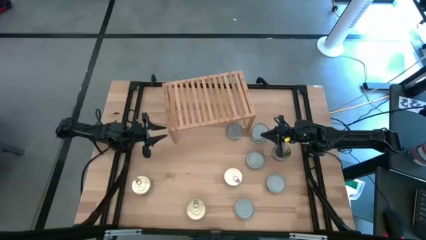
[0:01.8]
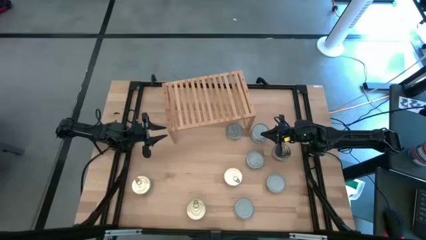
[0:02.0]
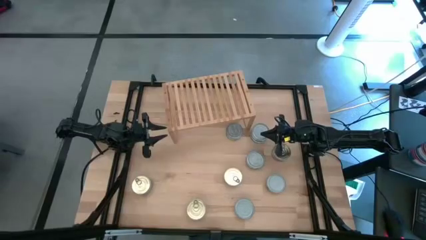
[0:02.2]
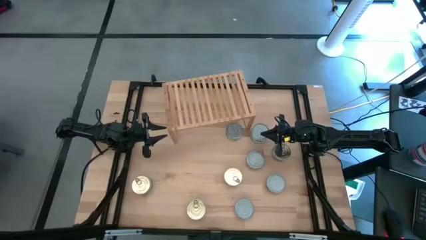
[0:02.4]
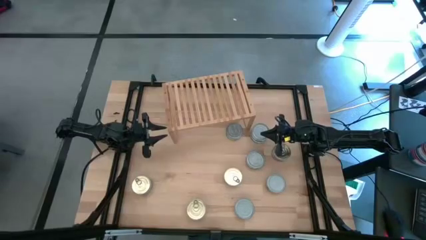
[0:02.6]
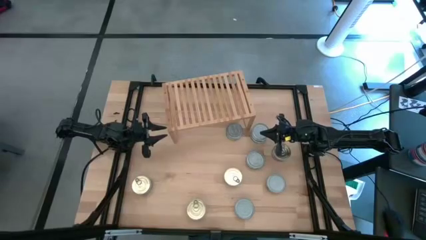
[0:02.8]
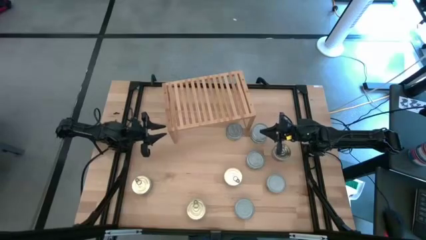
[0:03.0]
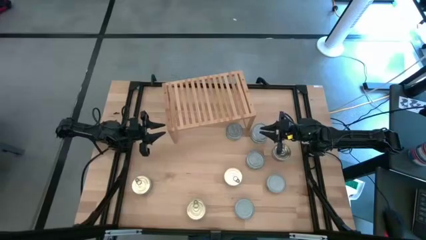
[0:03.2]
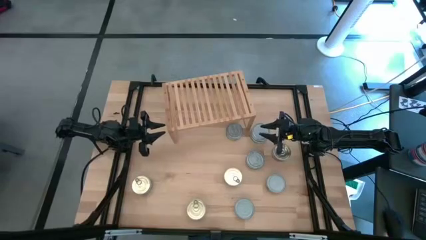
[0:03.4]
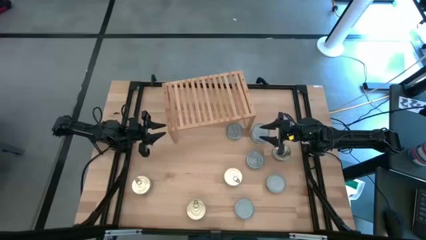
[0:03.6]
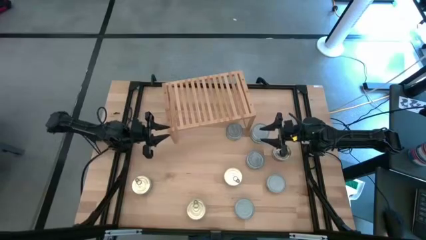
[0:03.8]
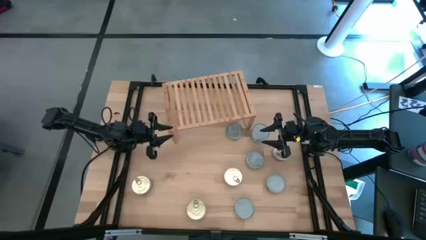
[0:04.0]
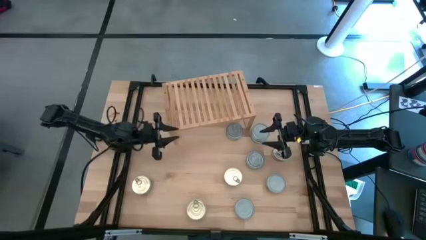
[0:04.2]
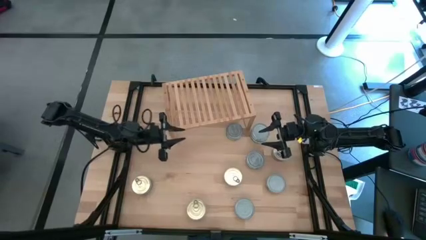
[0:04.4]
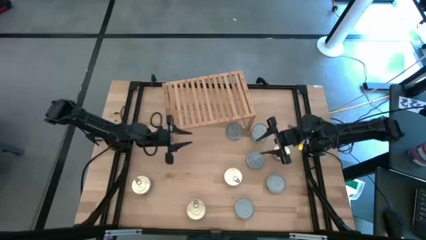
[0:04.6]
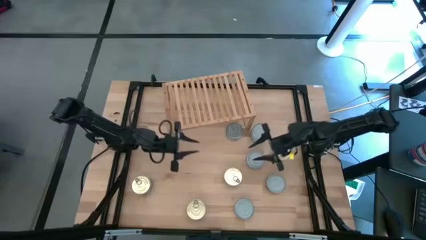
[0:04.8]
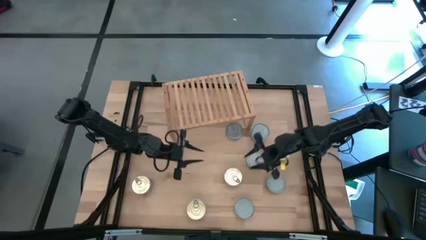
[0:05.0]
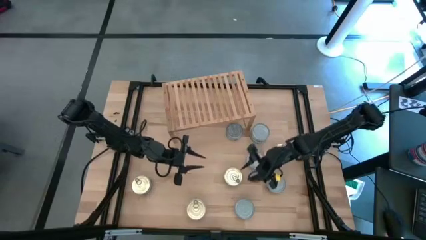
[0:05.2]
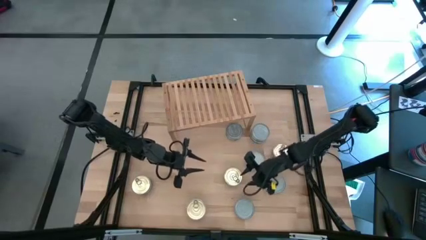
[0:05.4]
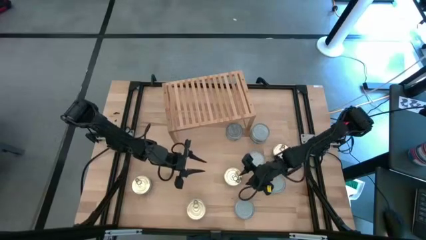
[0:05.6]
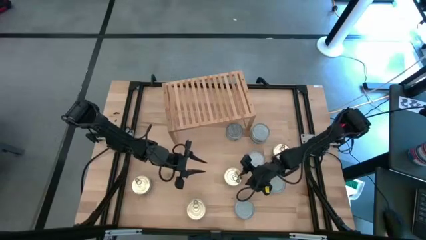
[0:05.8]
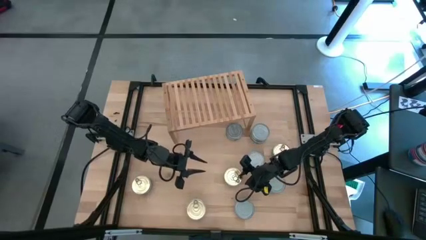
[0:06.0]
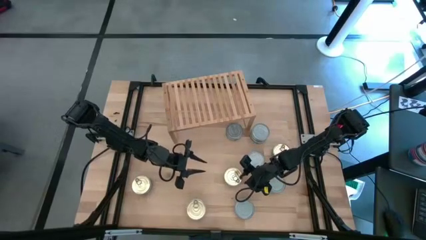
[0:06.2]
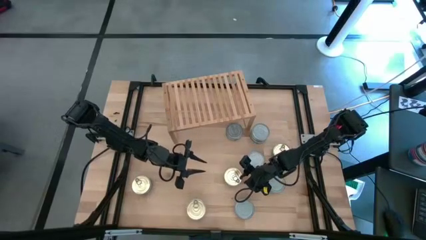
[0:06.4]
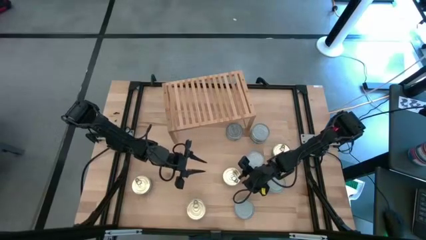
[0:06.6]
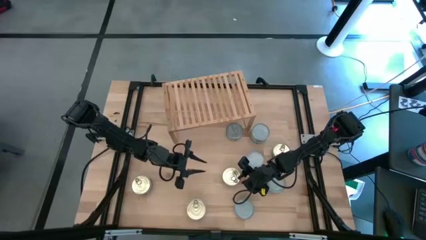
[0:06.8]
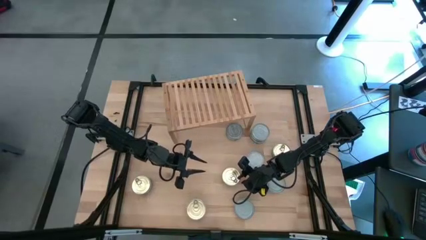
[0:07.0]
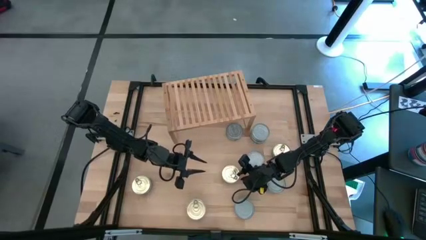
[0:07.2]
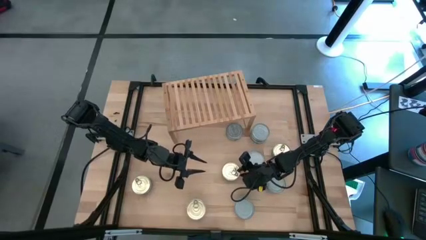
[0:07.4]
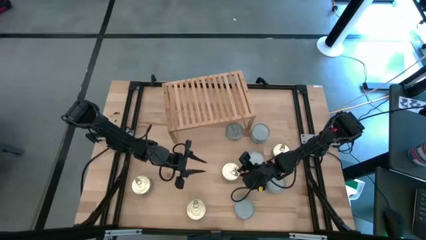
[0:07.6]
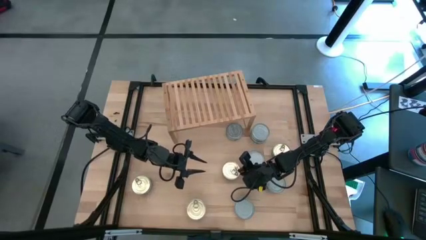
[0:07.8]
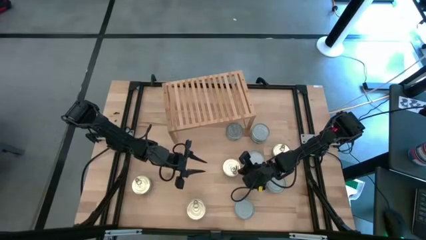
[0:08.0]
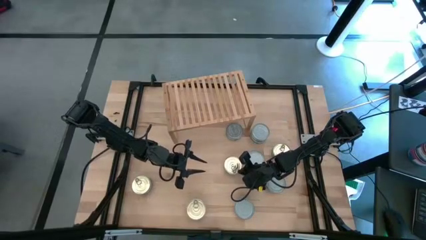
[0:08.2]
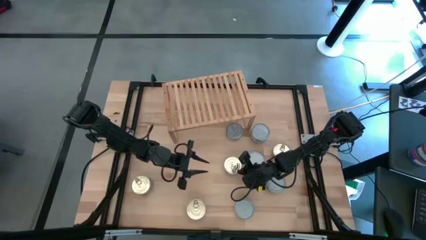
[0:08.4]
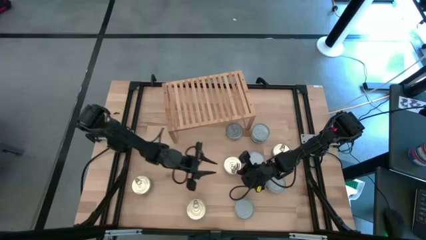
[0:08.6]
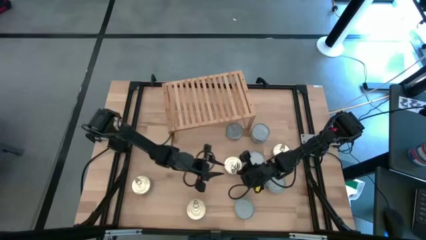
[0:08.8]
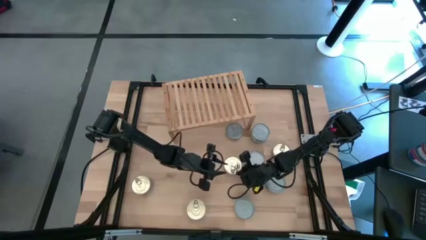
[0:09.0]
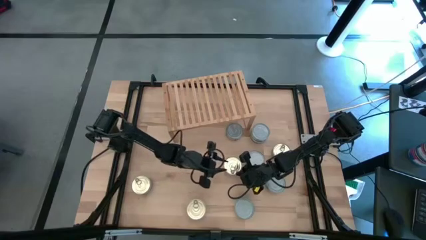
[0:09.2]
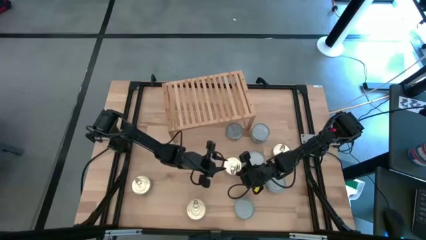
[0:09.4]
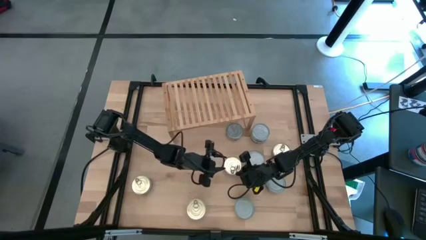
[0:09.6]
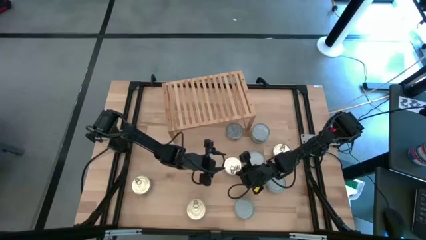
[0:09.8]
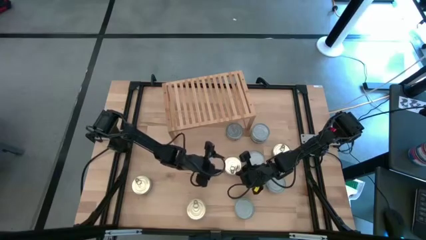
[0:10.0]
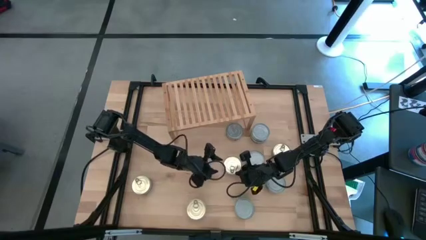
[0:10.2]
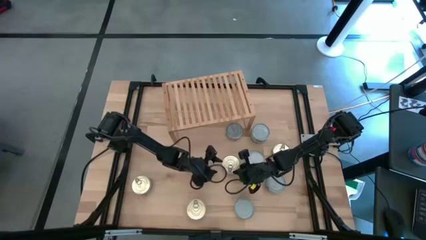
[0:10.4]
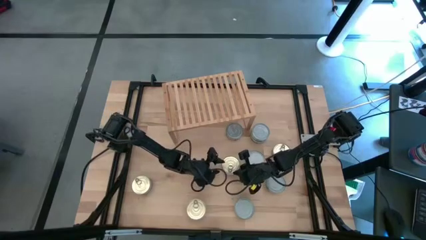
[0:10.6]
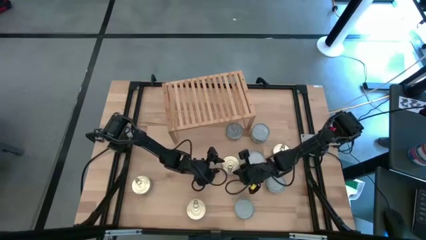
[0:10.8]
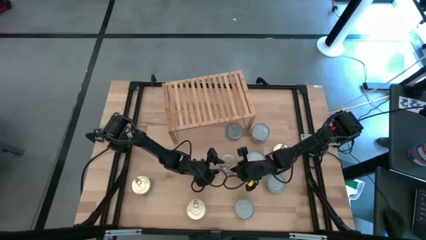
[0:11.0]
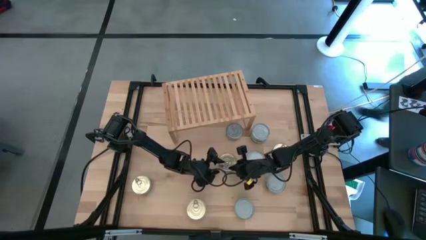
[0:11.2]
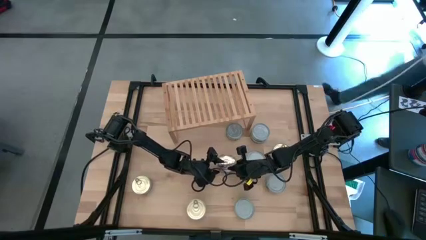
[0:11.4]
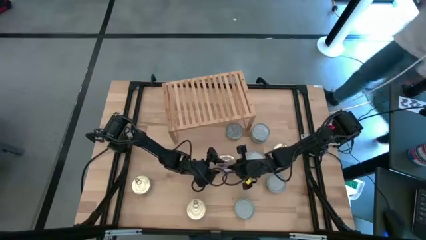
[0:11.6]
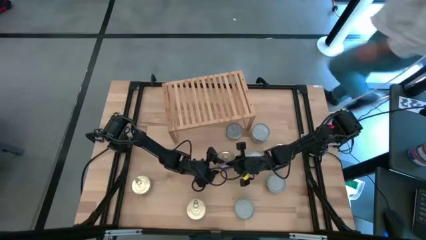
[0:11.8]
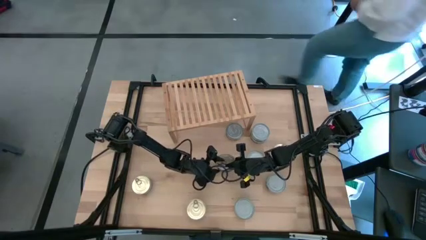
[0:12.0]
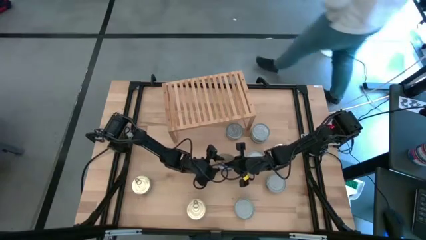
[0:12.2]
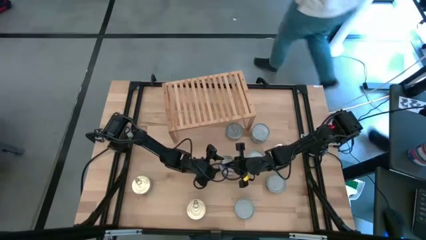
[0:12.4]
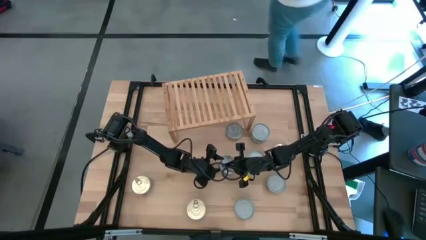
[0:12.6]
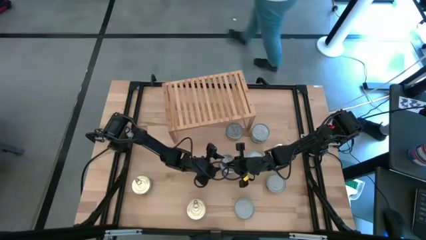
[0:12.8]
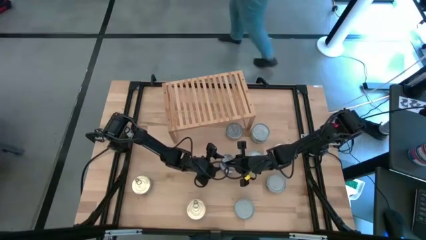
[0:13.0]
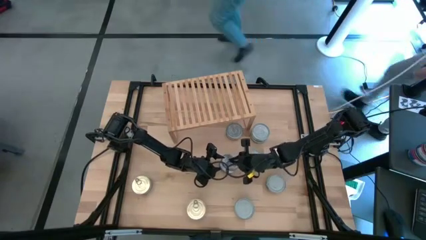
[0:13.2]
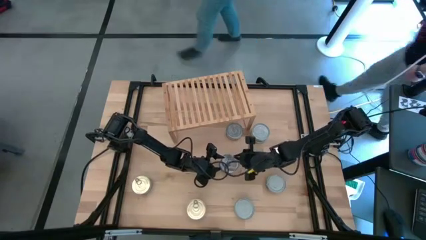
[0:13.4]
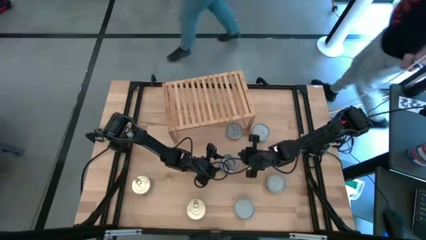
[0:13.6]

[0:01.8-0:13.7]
Task: Stack canned seafood by type on shelf
Put the blue tuna can on the shelf
